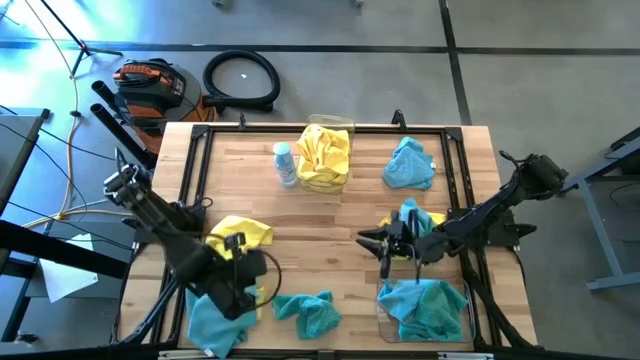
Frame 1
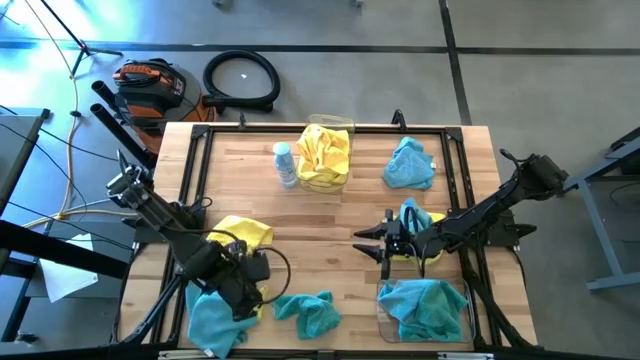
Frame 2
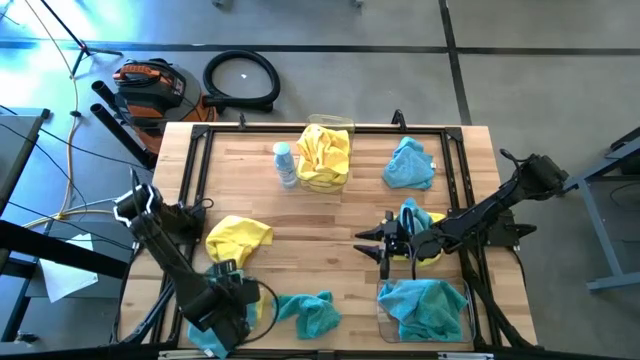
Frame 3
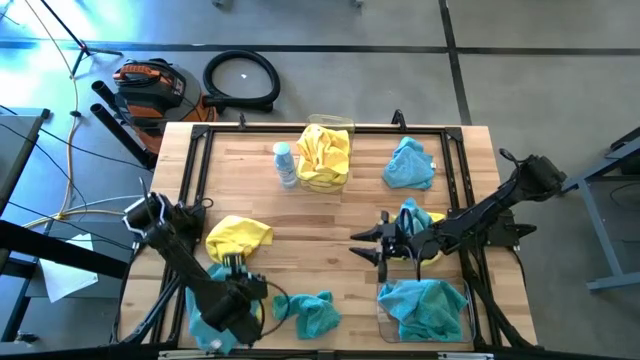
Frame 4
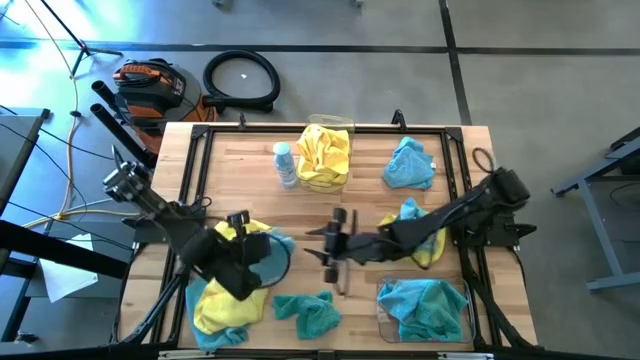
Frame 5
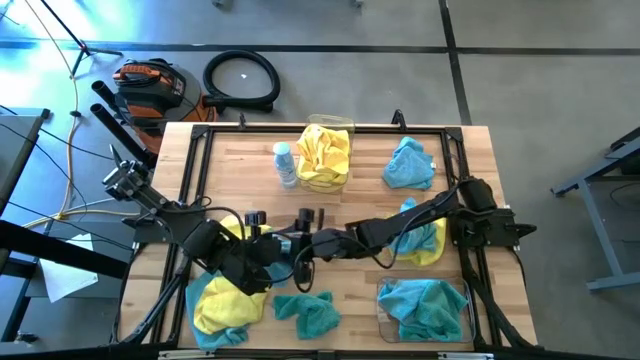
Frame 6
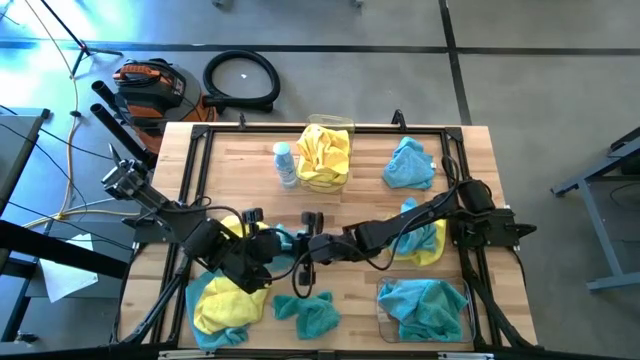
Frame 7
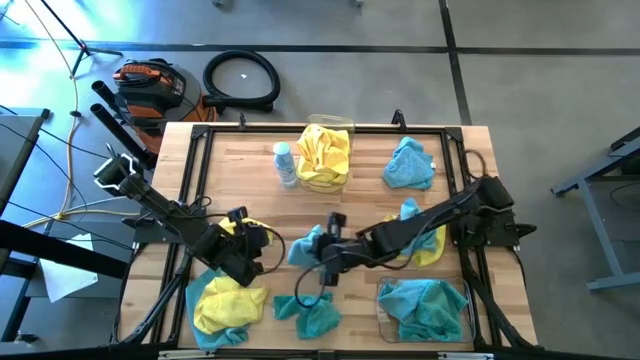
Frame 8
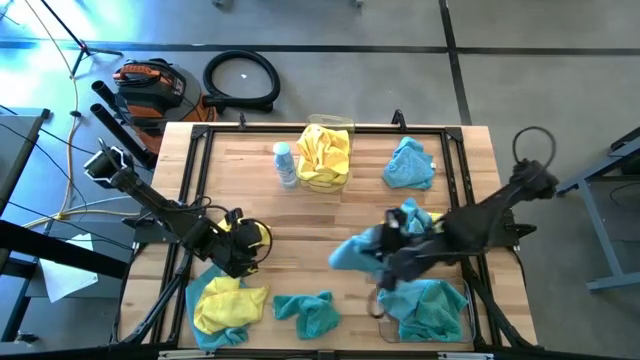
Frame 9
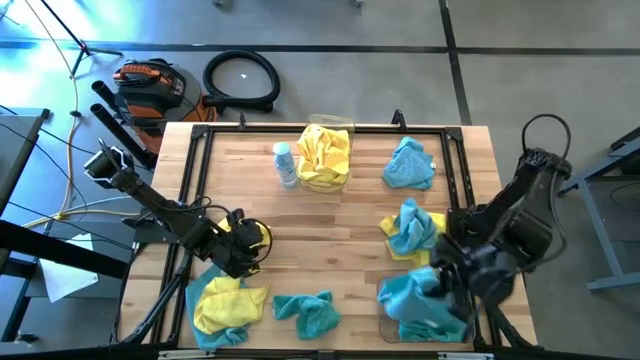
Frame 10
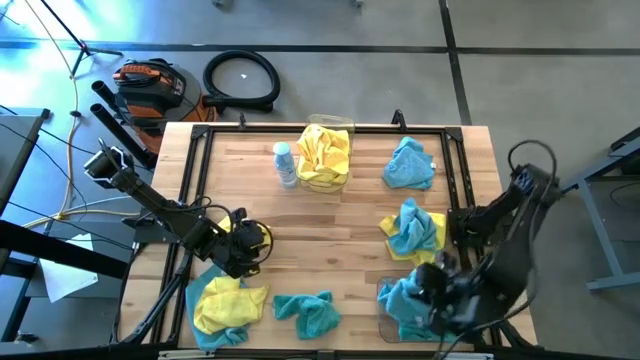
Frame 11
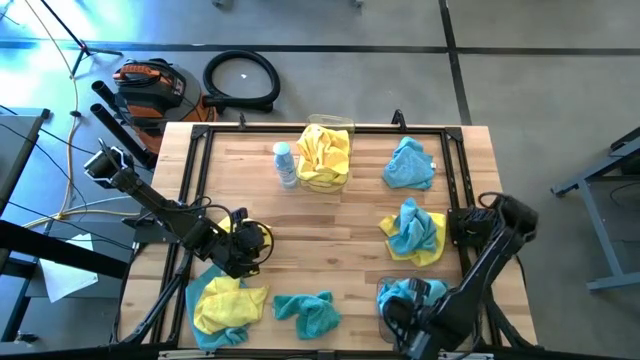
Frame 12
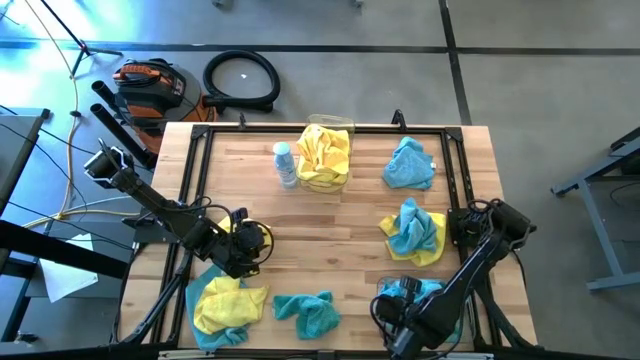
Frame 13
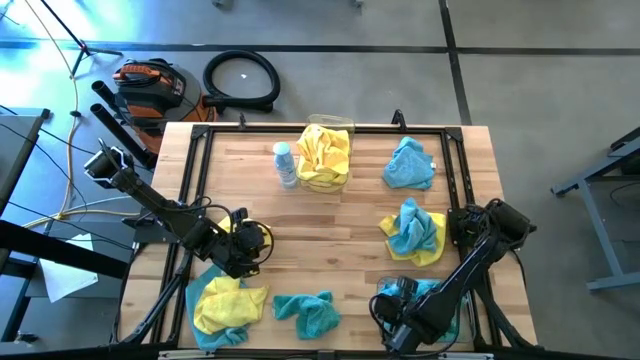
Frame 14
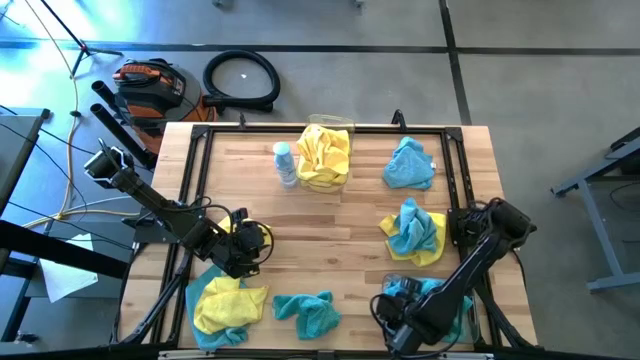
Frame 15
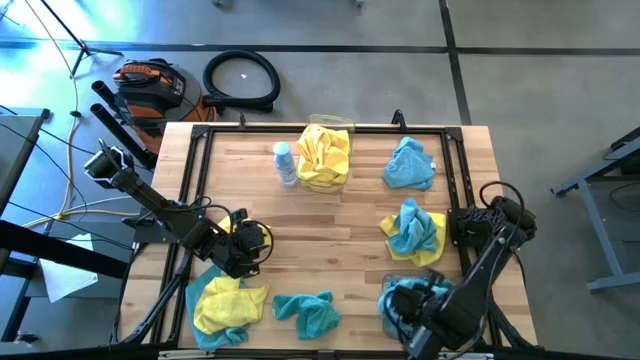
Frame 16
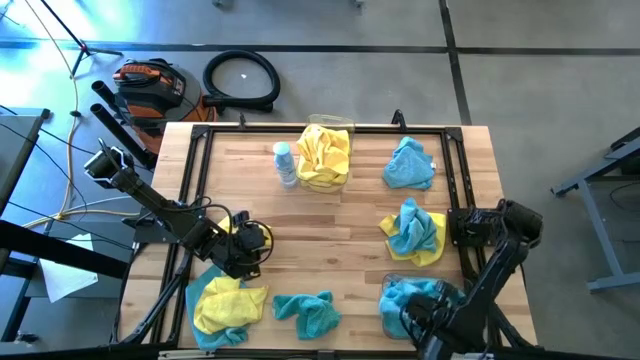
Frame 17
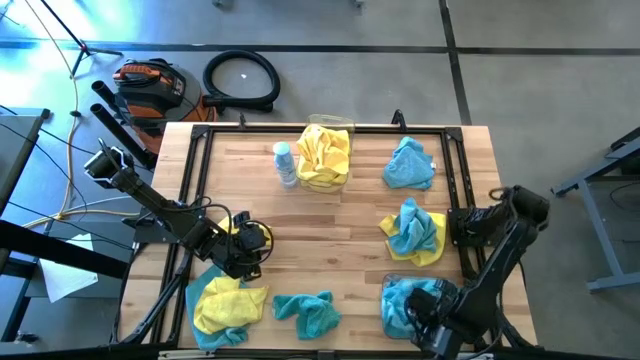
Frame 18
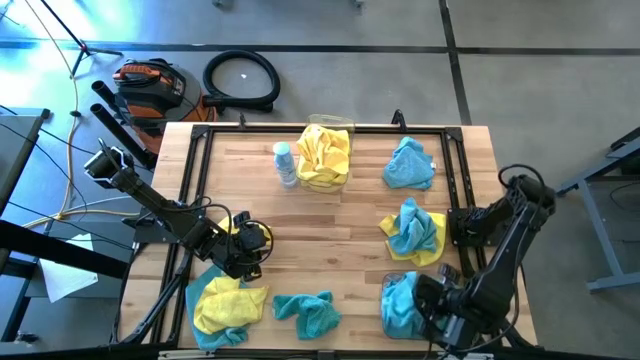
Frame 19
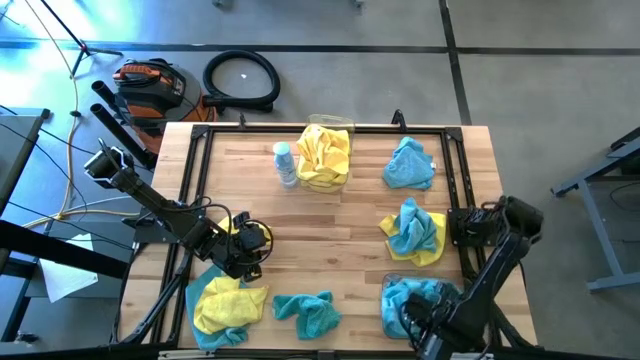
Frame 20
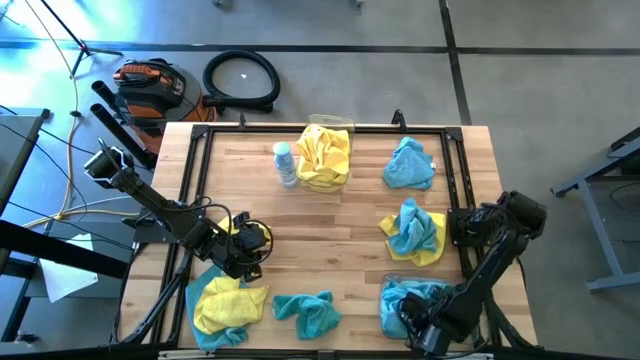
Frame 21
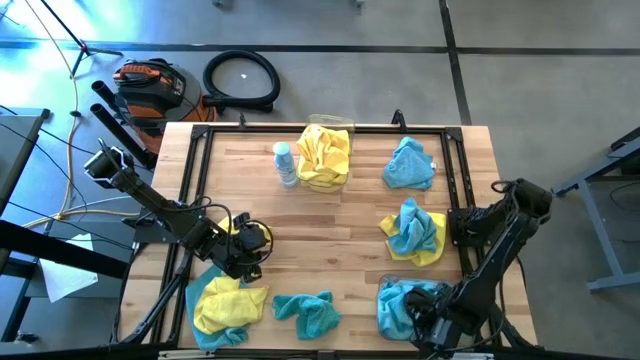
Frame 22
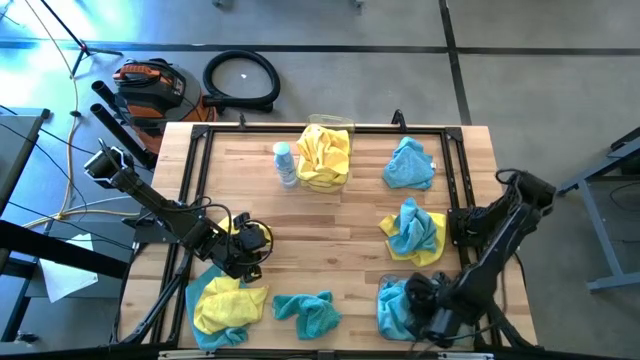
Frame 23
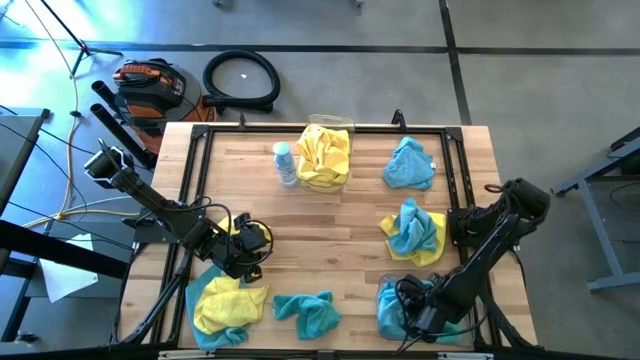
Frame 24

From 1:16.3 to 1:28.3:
Task: Sort microfiber towel by color & place in baskets
Put the blue towel into the bottom transparent bin

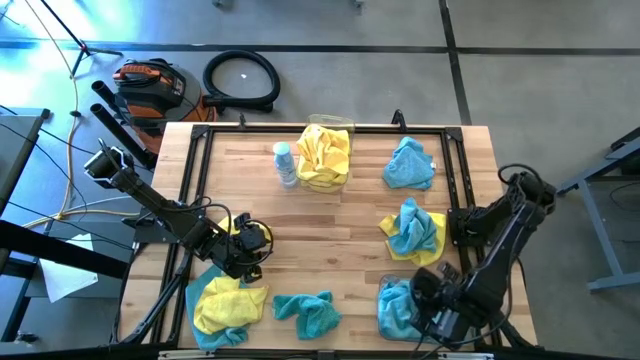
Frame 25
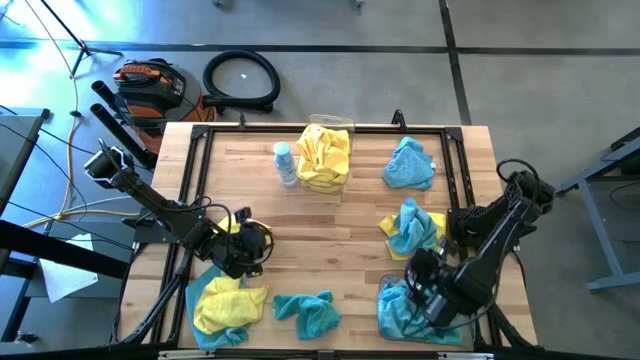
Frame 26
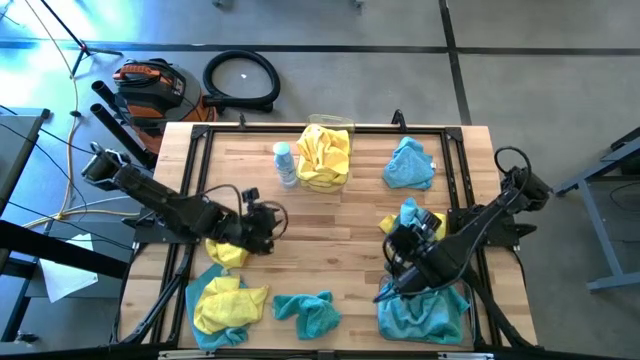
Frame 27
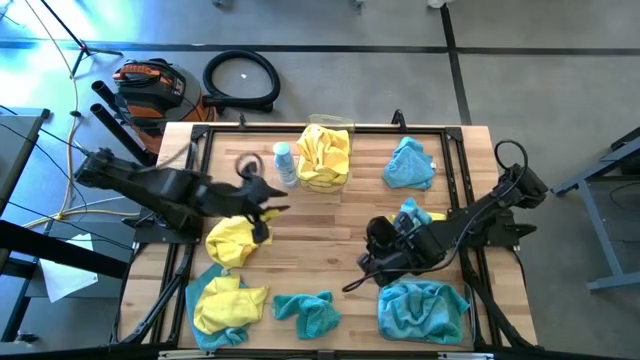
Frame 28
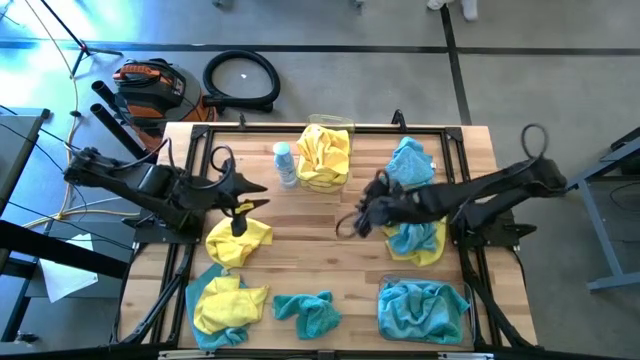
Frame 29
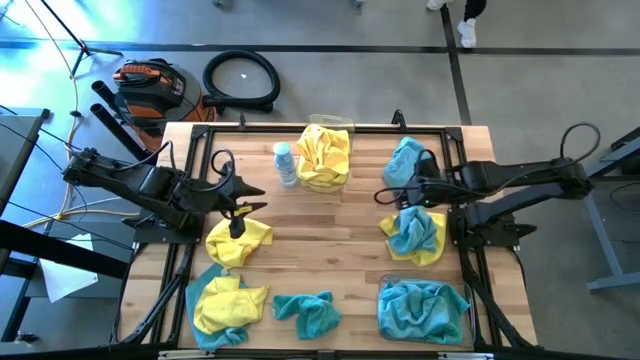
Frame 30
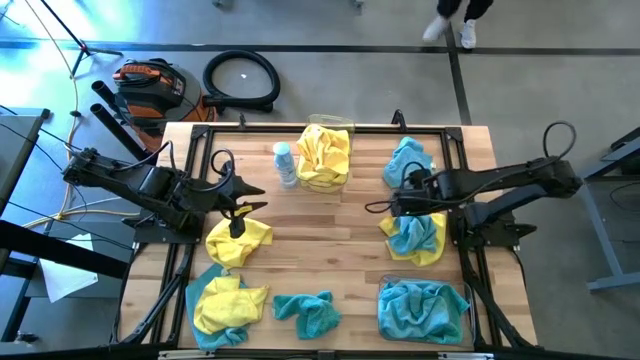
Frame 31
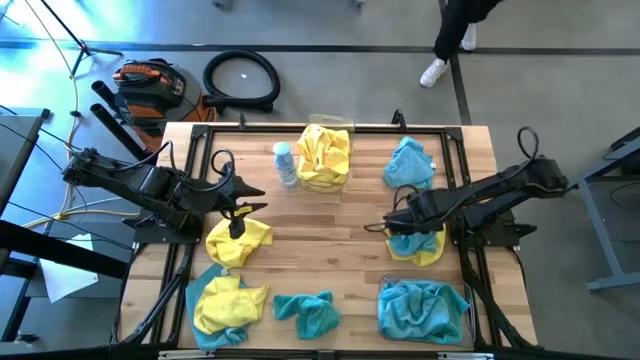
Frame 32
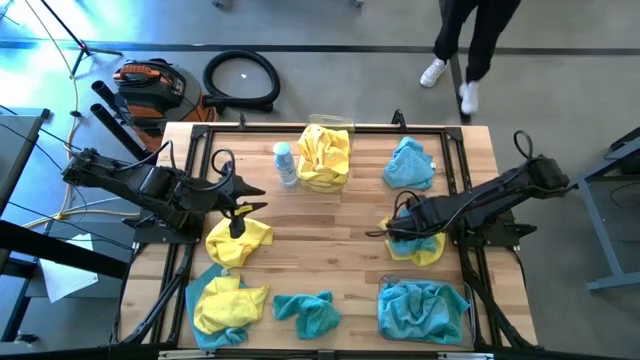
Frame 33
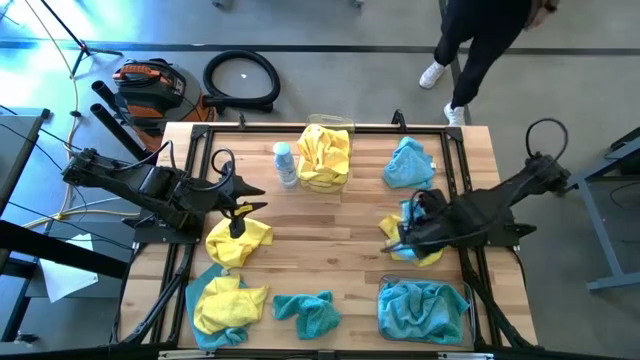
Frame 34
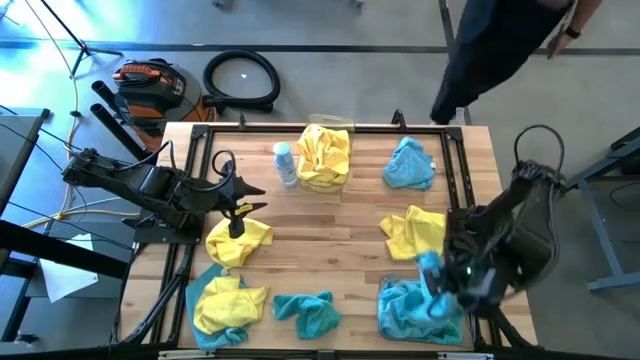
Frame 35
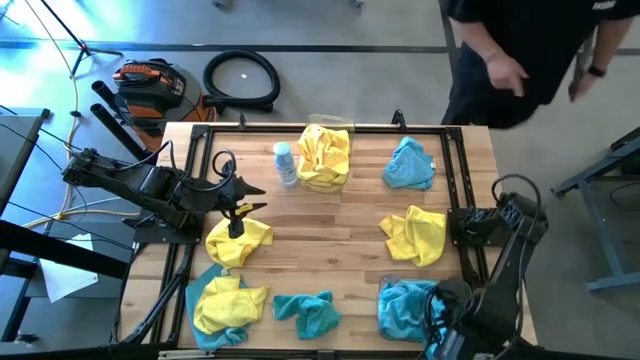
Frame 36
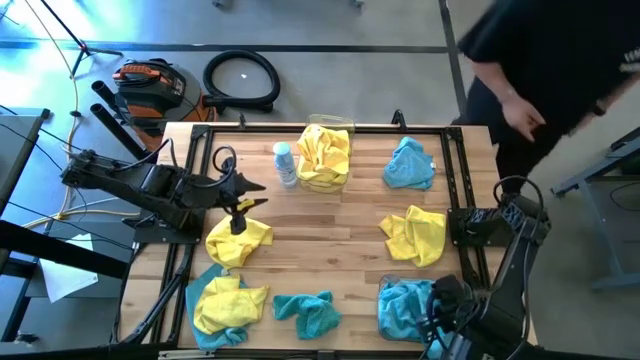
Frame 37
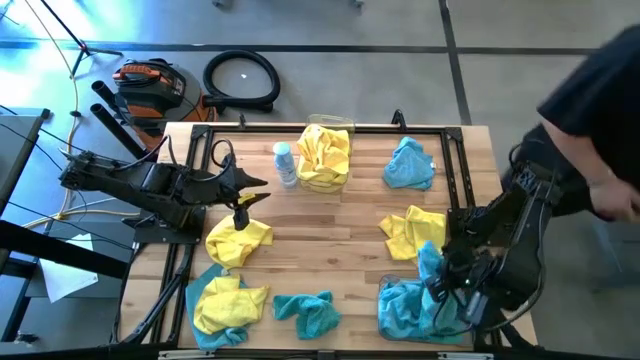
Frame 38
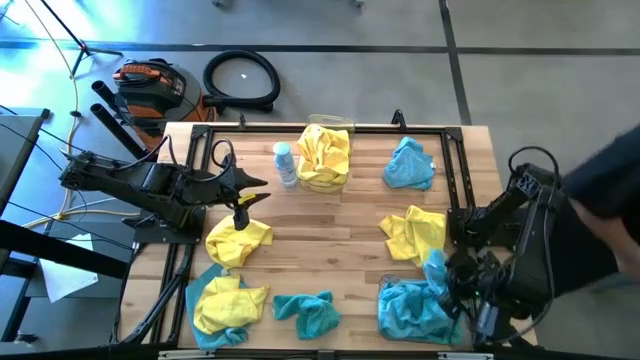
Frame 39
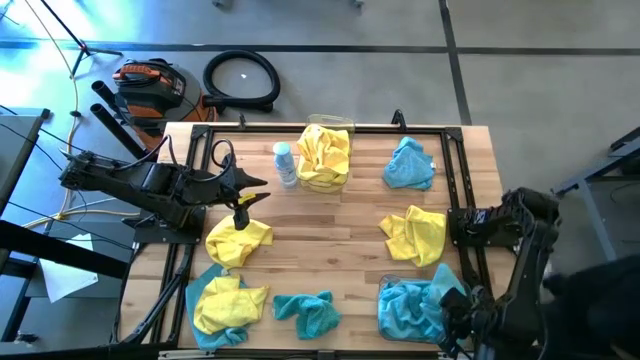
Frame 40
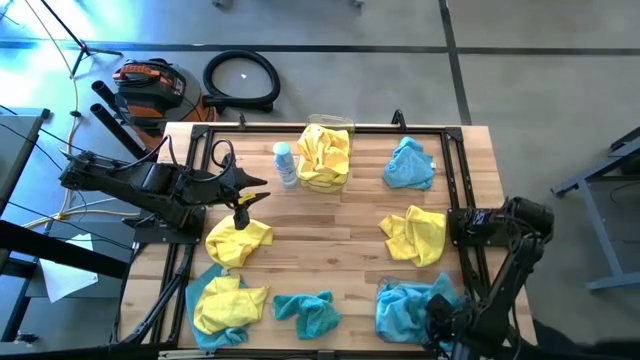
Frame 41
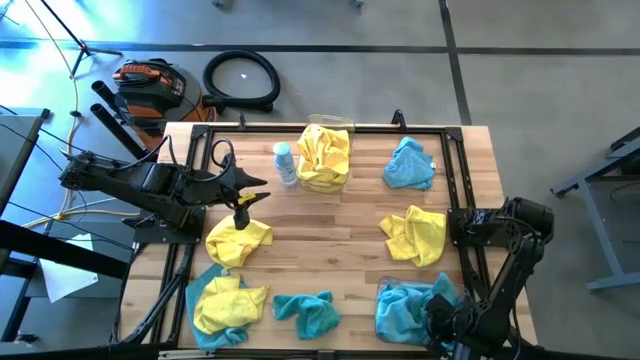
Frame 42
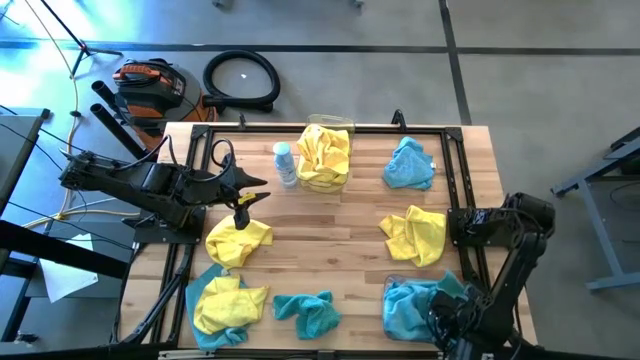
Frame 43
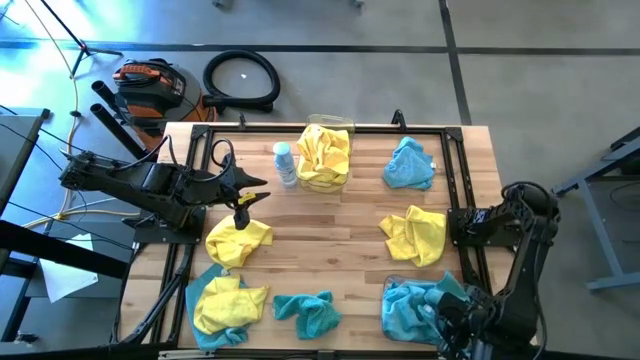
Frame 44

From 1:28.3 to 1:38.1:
Put the blue towel into the bottom transparent bin
